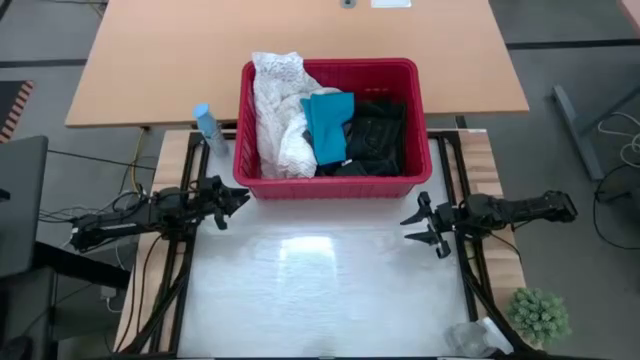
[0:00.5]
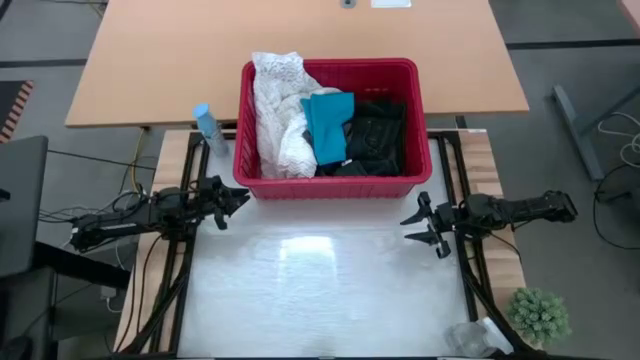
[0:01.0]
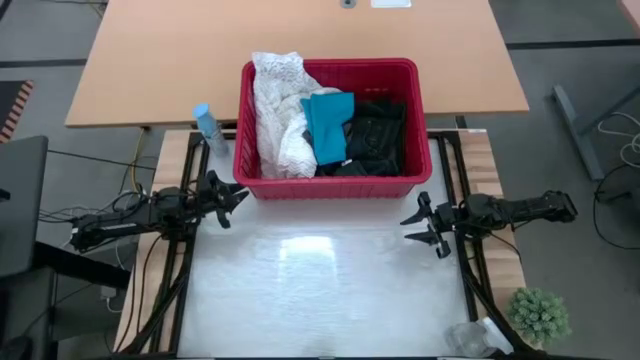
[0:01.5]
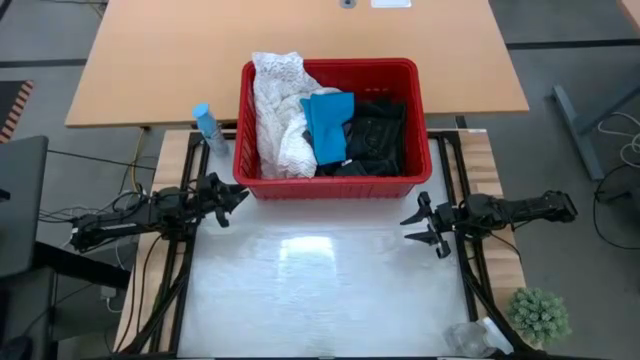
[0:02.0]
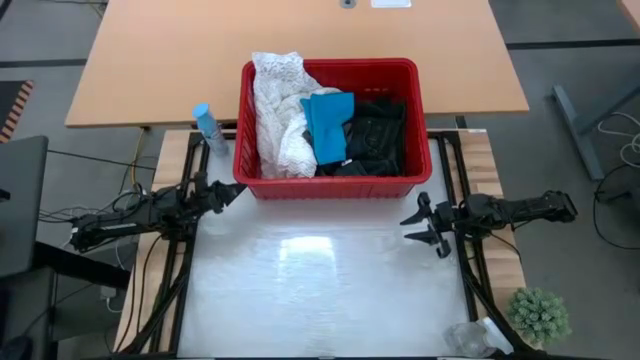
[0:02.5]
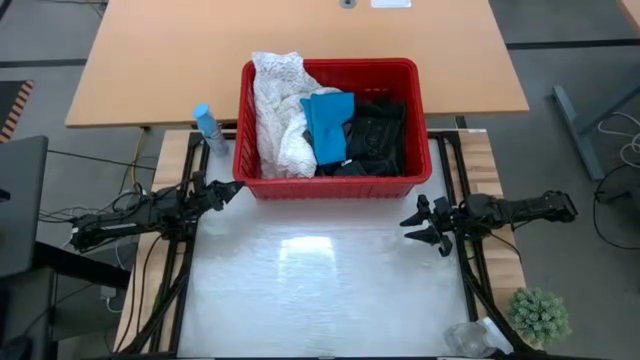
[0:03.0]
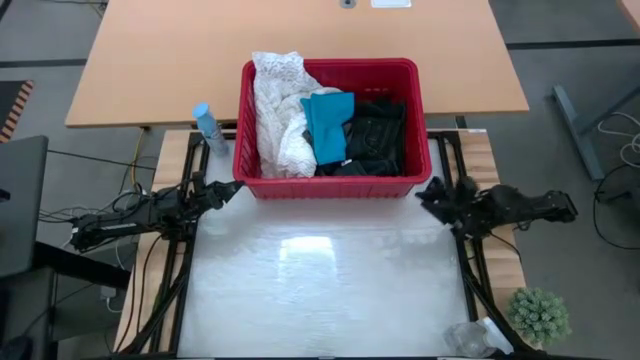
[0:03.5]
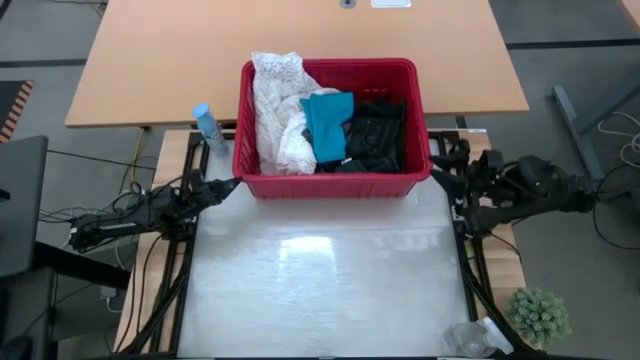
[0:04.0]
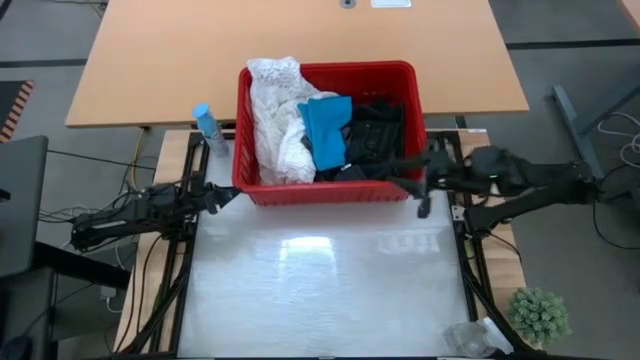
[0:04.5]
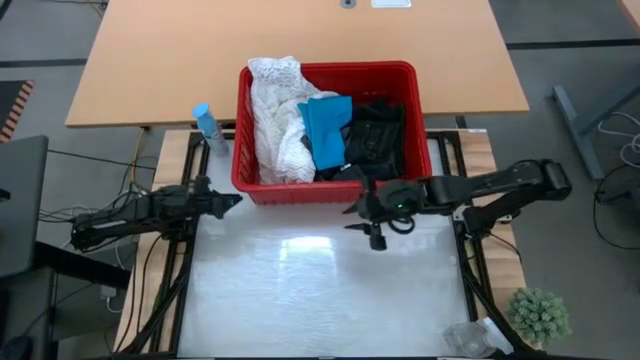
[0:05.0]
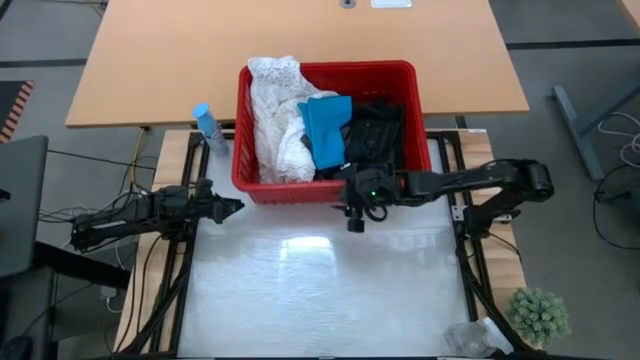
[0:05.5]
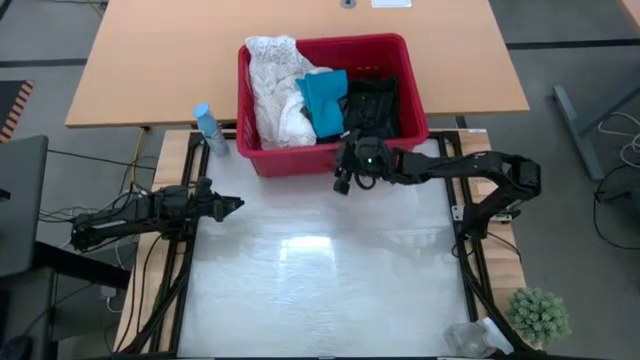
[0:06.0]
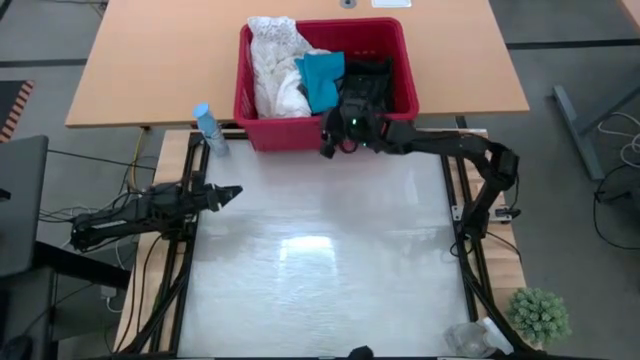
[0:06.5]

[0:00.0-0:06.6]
Task: Fold laundry
Move the red bin to the top of the table
